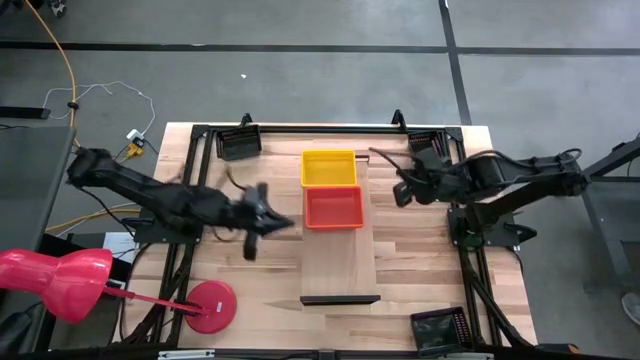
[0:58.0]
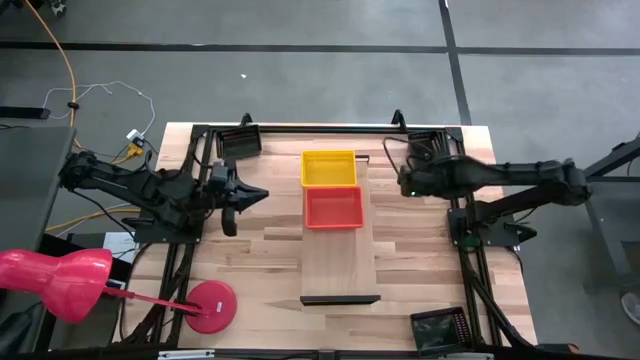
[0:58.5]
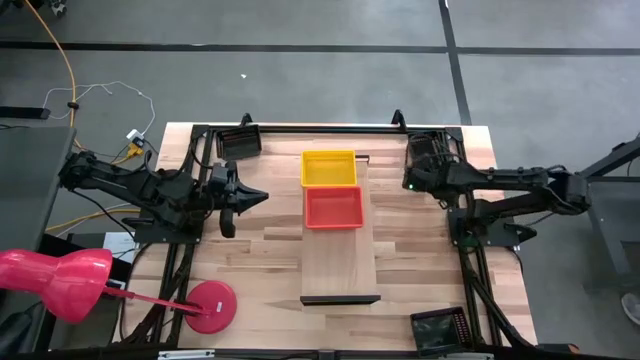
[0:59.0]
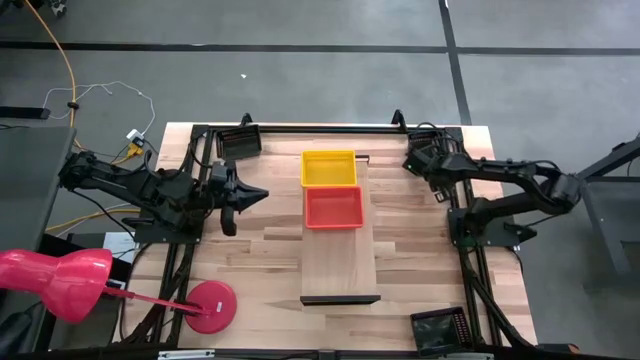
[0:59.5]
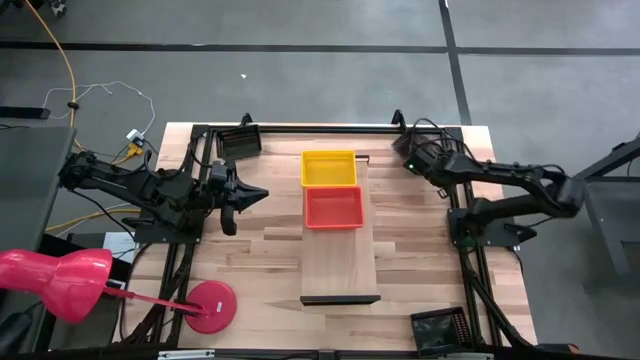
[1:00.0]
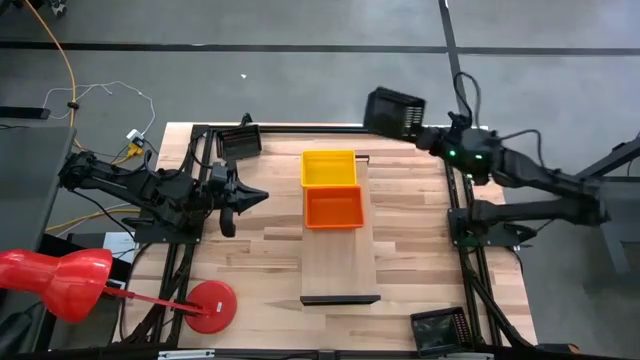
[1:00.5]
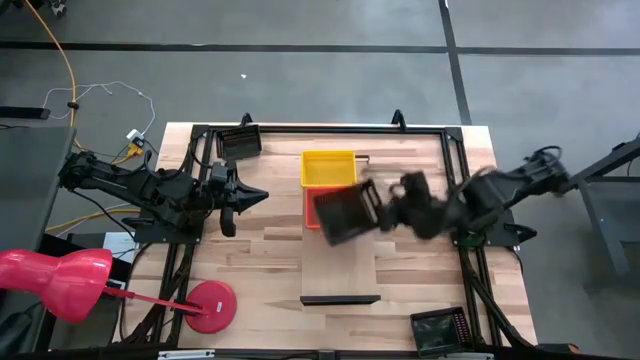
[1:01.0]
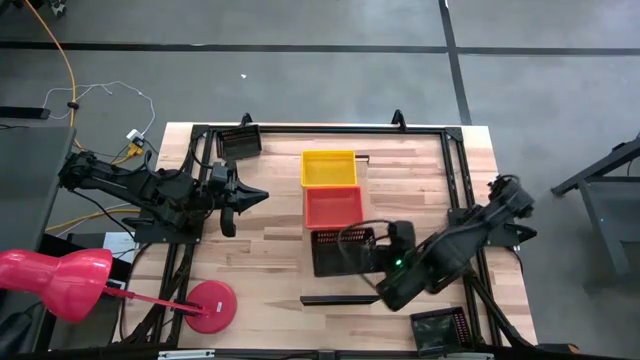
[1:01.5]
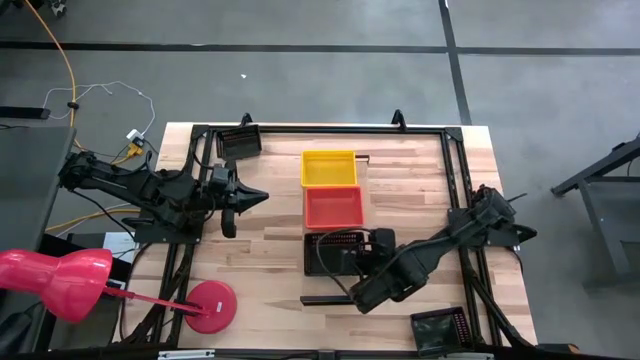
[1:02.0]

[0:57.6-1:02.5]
Task: Stack baskets on shelf by color
Put the top right black bin on the shelf

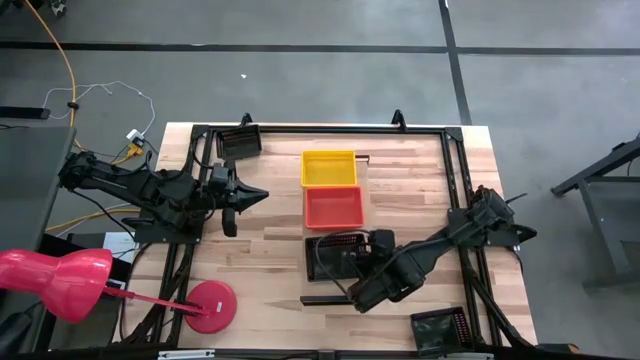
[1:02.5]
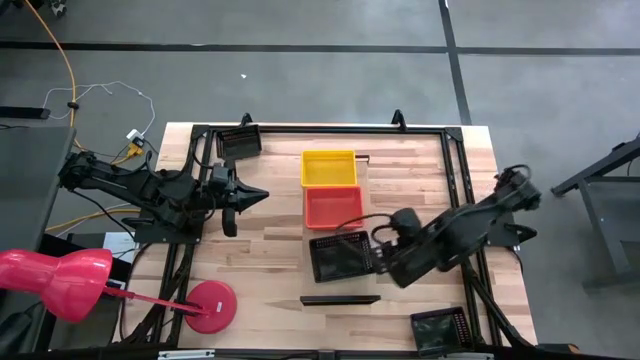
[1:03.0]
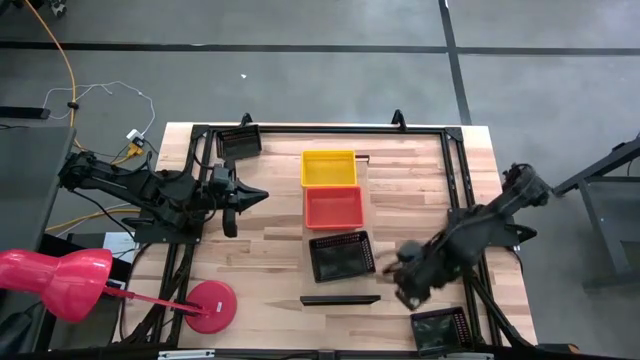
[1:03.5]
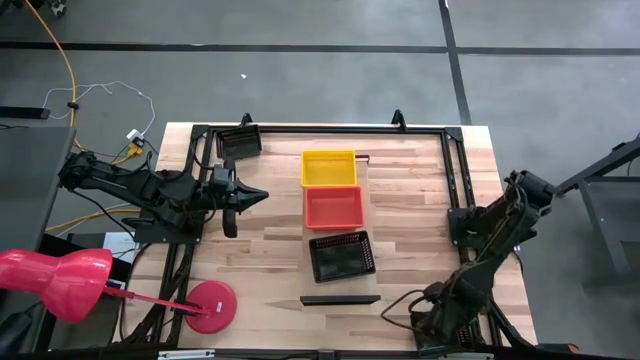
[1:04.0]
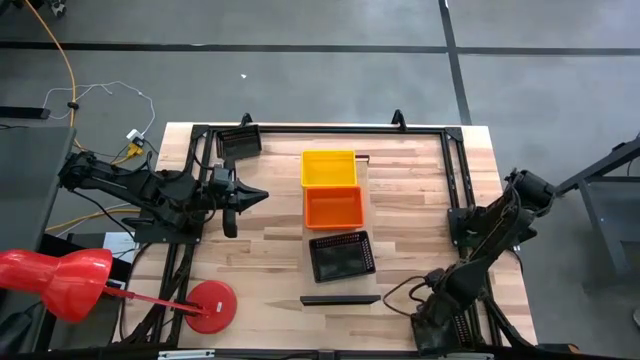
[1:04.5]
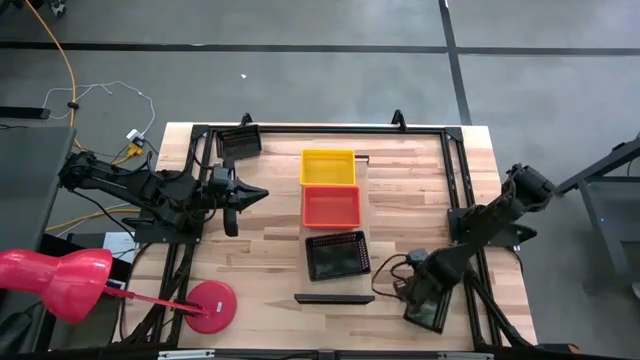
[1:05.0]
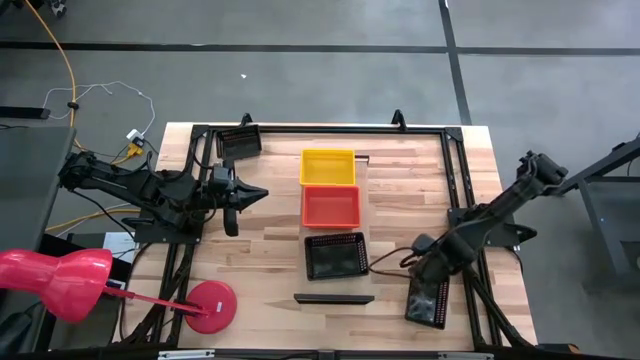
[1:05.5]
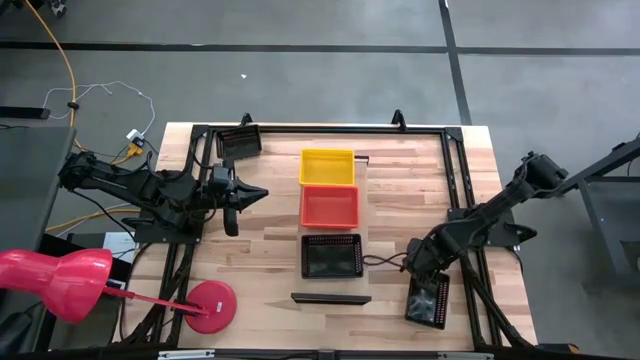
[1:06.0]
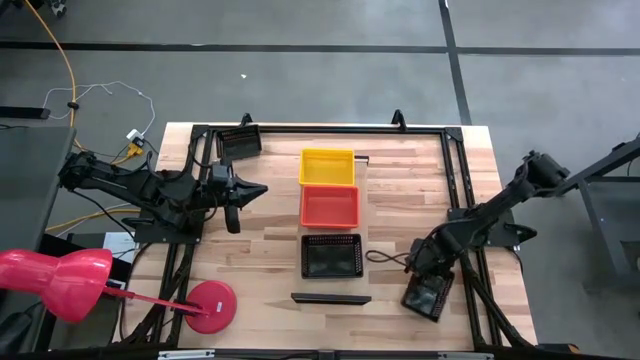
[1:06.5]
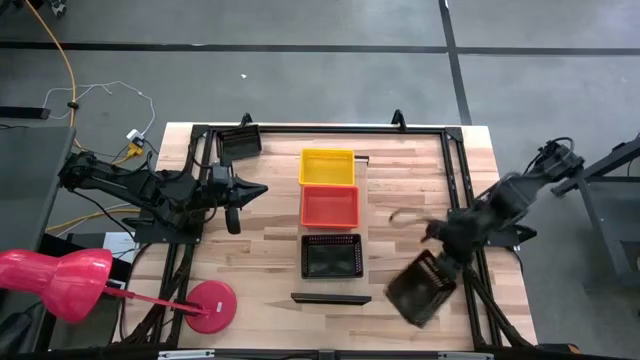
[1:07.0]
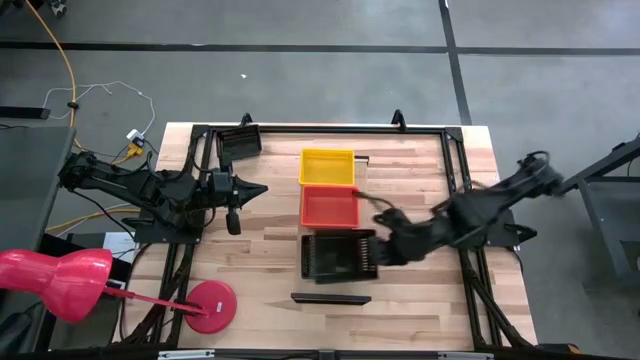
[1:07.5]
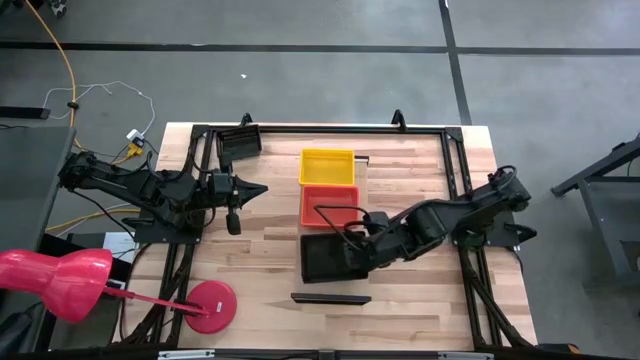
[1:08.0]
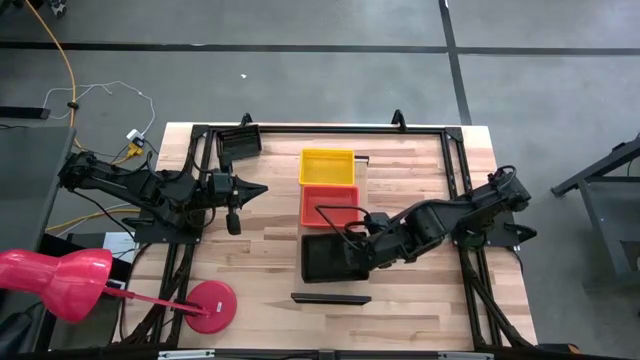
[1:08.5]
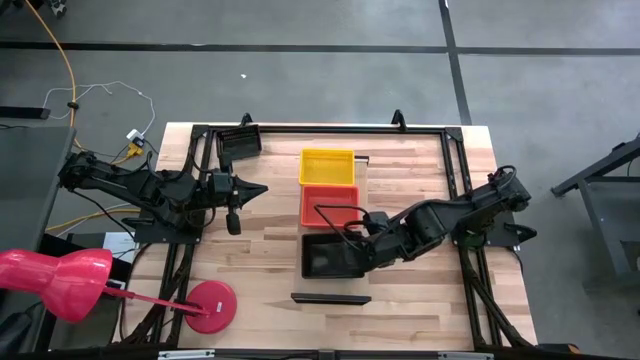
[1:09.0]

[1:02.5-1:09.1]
Stack the bottom black bin on top of the black bin on the shelf

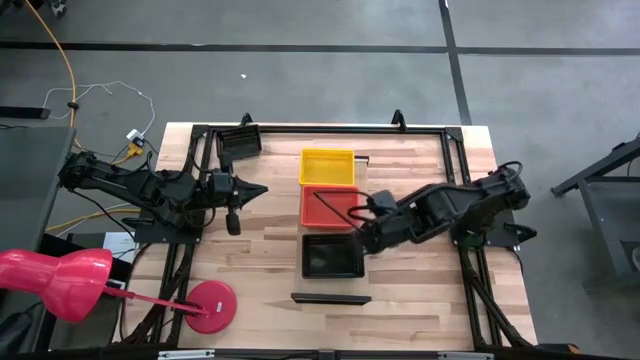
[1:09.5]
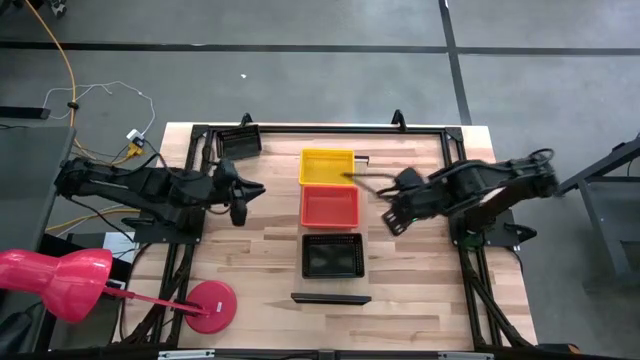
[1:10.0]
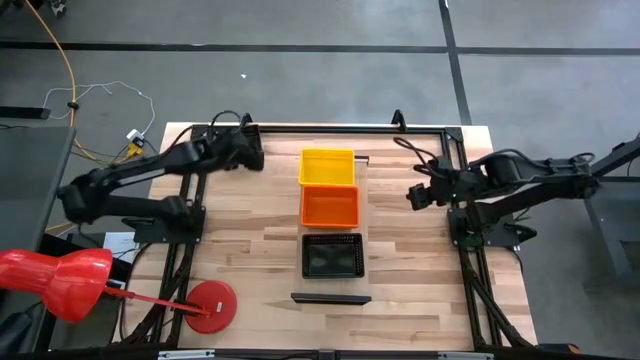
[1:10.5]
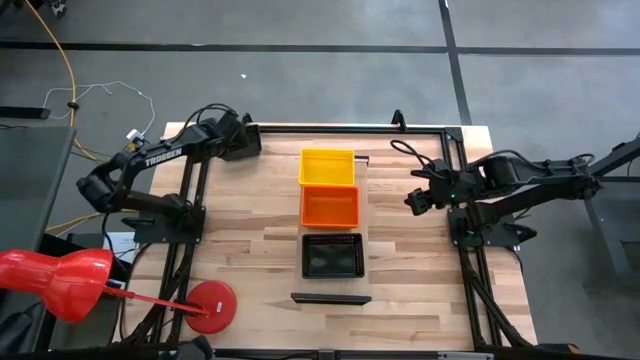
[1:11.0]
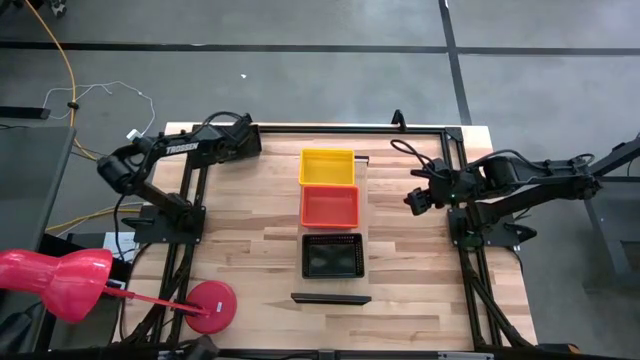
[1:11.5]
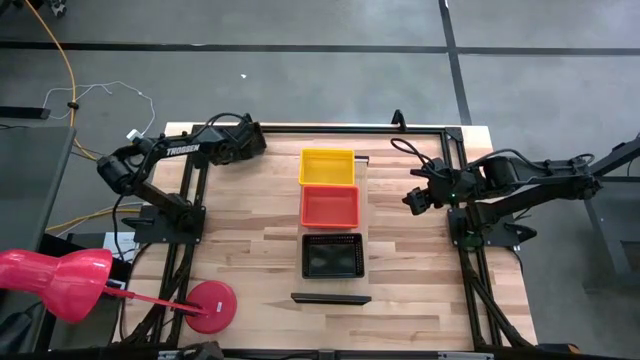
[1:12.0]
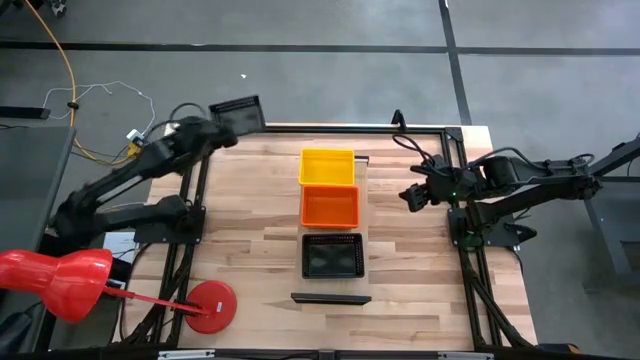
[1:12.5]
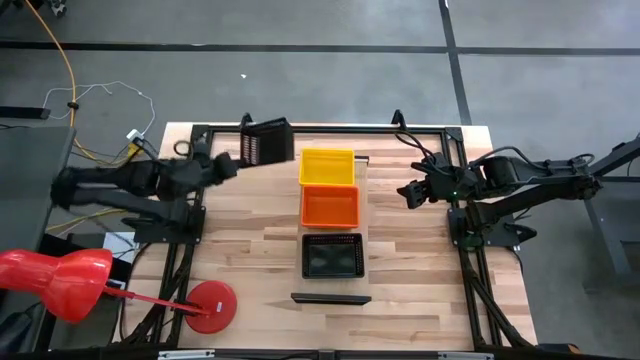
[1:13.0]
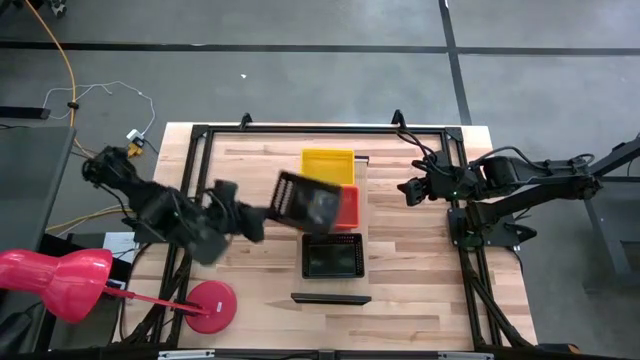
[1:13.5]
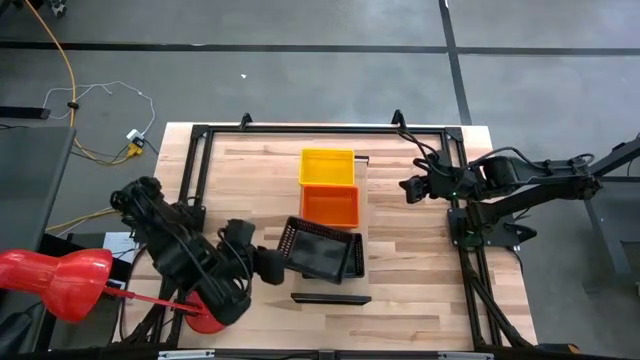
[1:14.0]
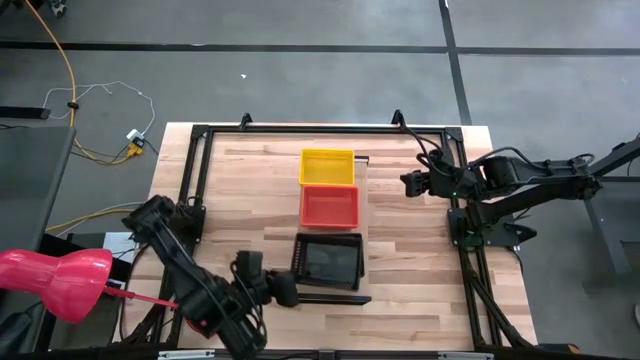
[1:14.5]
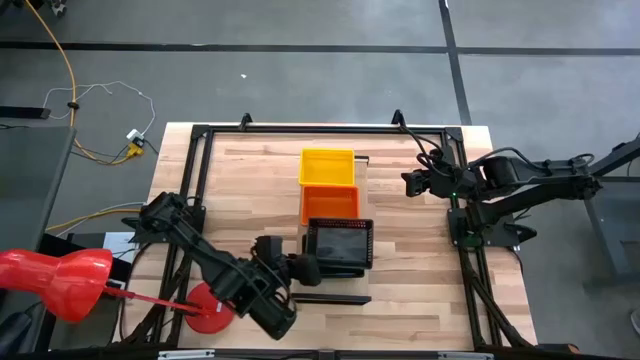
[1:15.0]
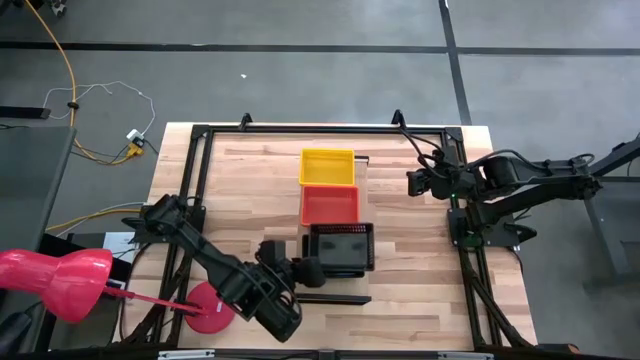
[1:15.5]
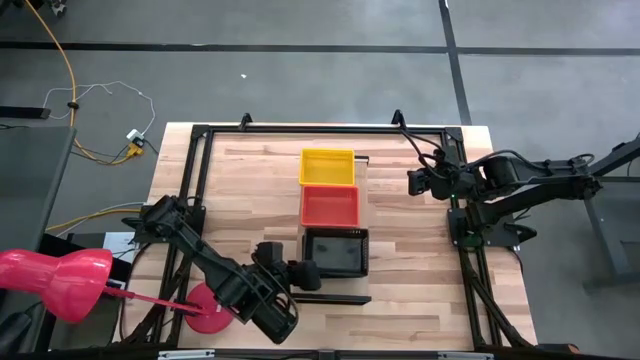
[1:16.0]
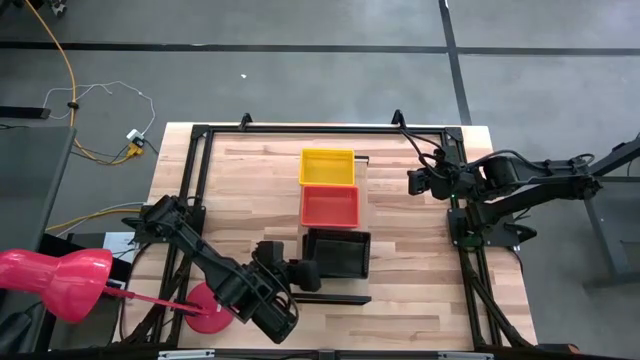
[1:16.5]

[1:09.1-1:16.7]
Stack the black bin on top of the black bin on the shelf

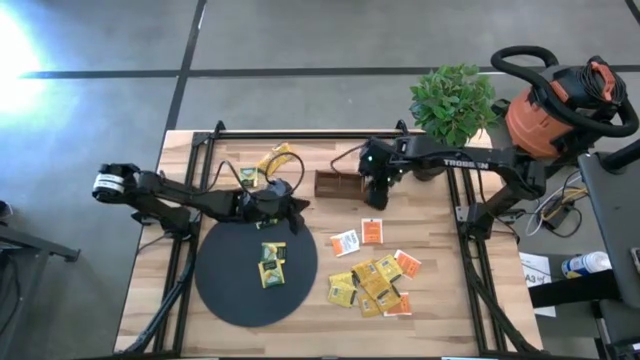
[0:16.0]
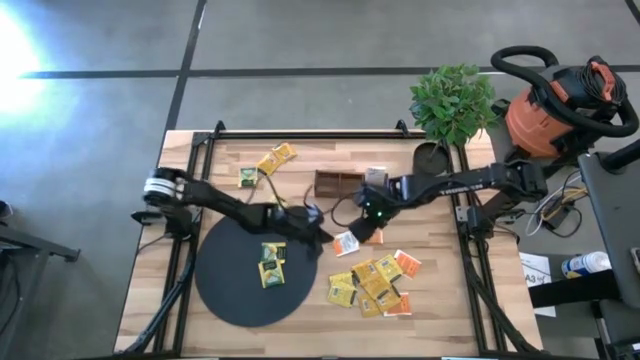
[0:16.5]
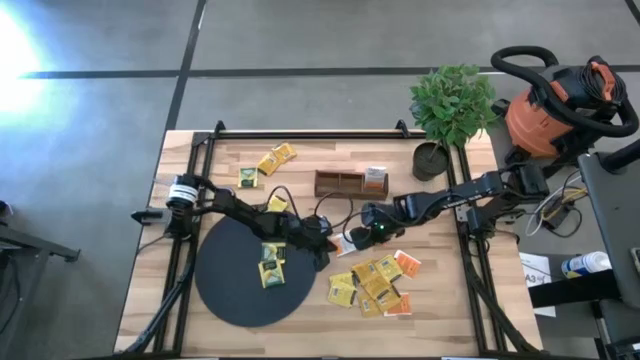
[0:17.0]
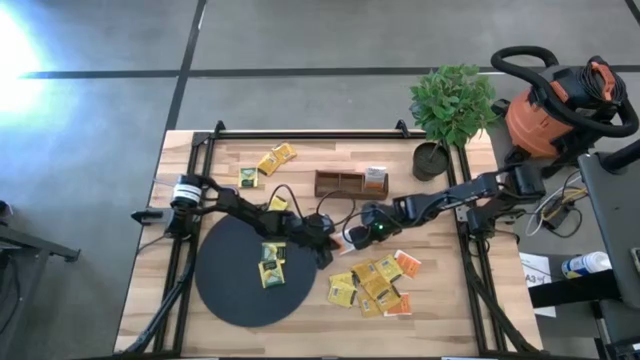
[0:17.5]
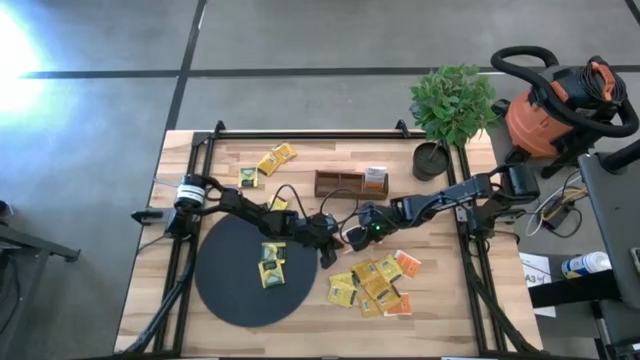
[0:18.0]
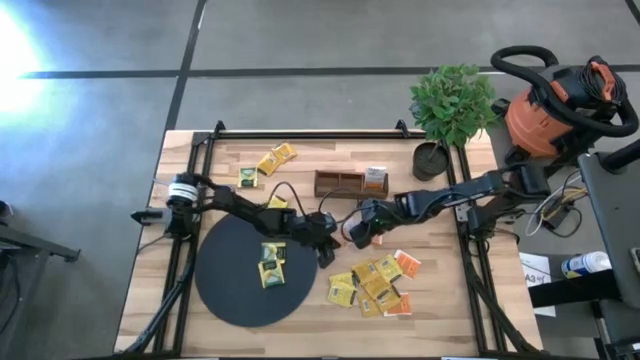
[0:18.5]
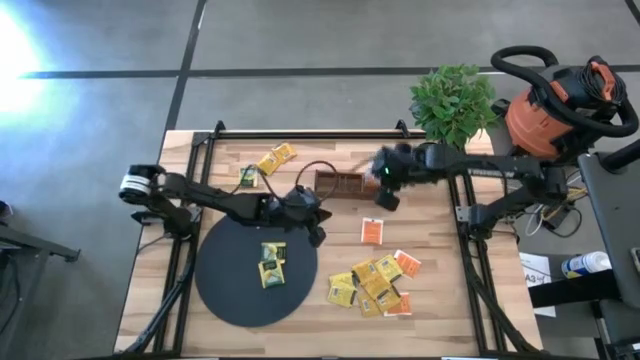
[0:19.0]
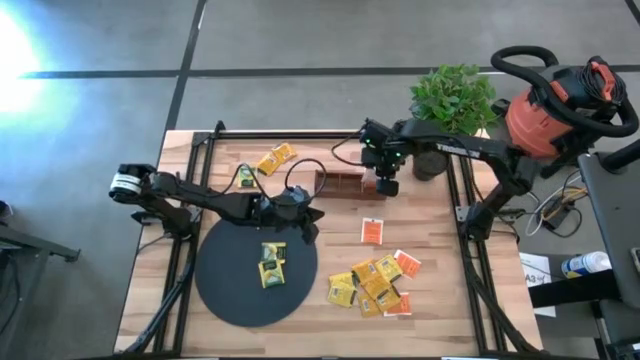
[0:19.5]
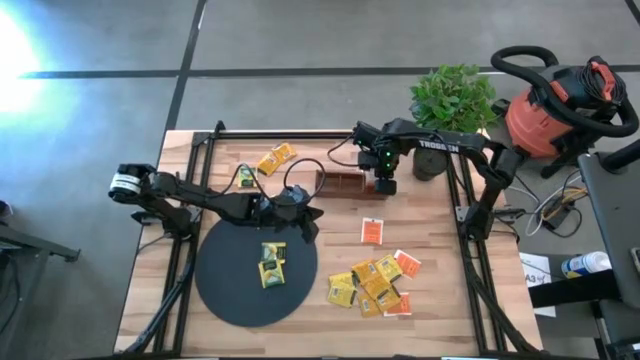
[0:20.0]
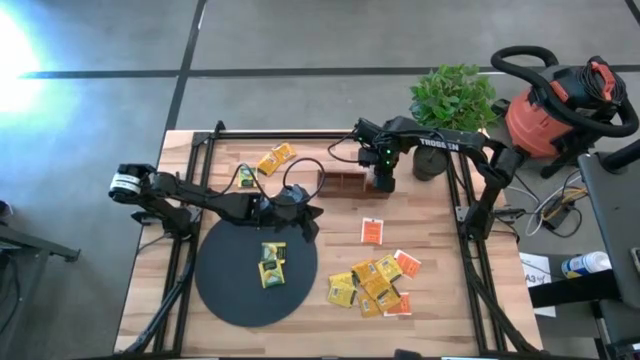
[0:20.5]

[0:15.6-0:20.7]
Task: Pick & Place Tea
Put the white tea bag into the right section of the wooden organizer
